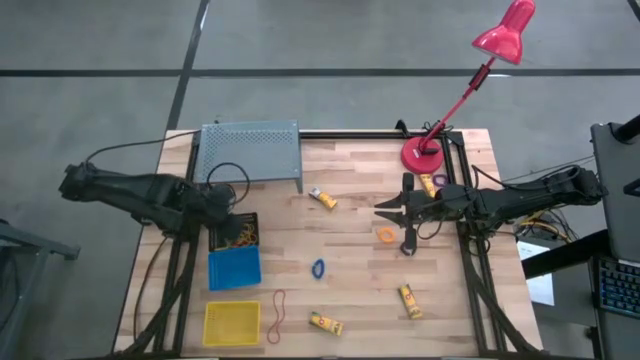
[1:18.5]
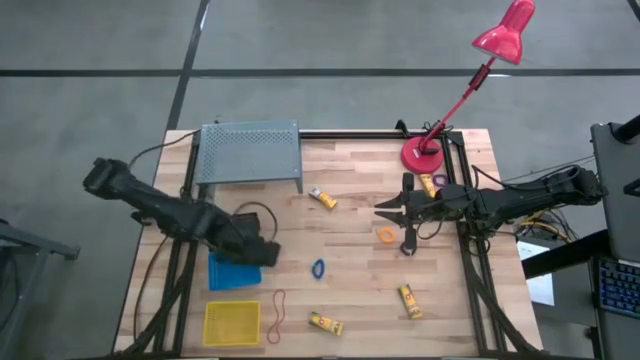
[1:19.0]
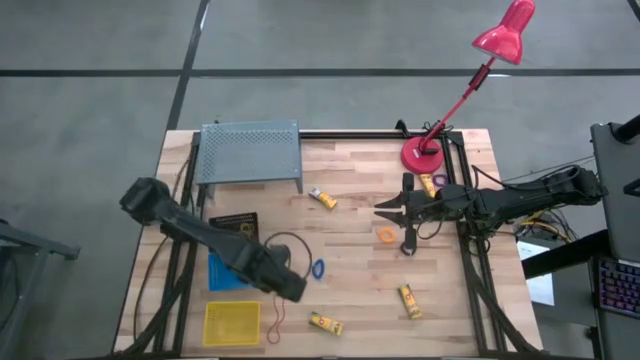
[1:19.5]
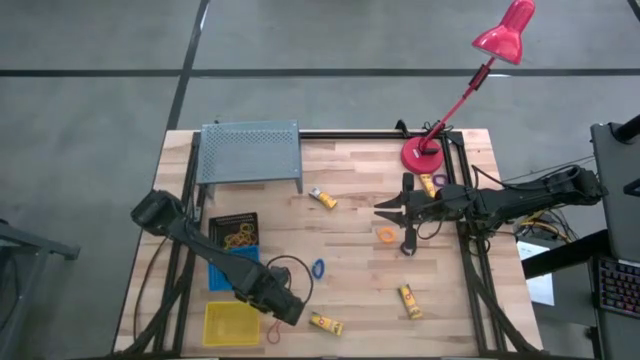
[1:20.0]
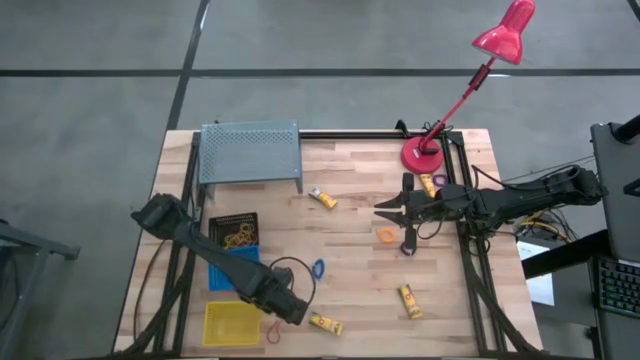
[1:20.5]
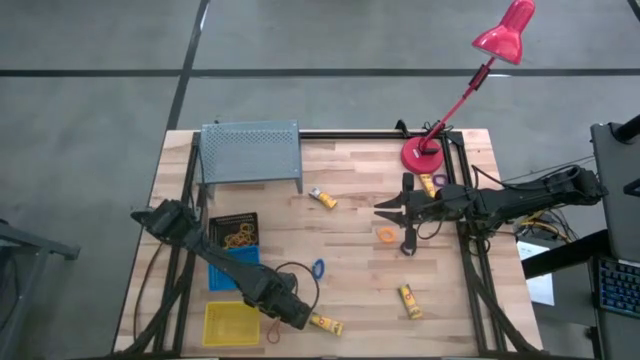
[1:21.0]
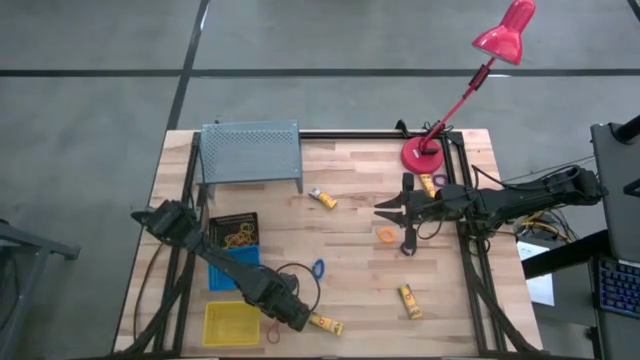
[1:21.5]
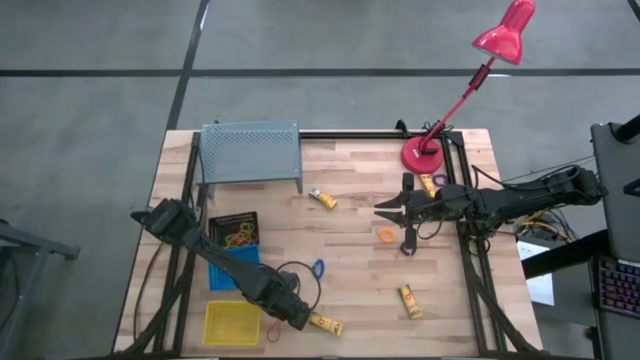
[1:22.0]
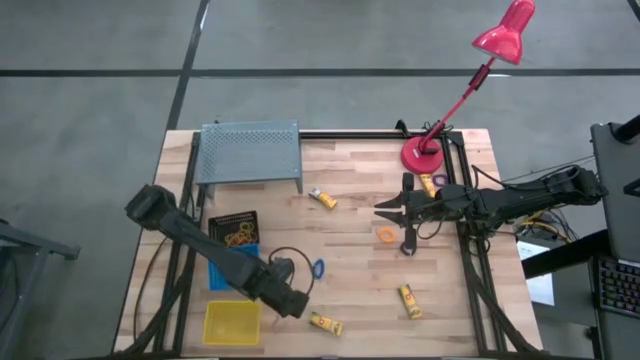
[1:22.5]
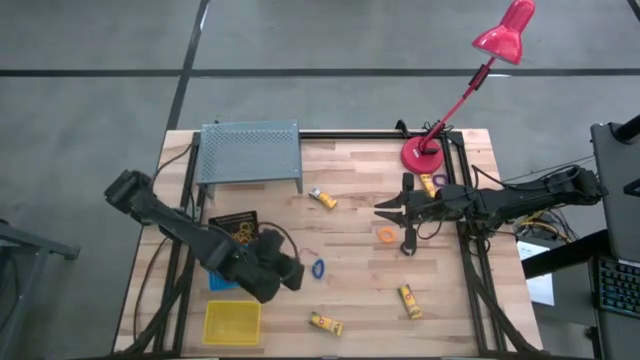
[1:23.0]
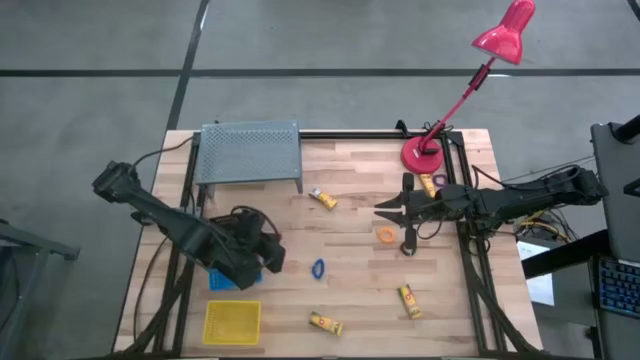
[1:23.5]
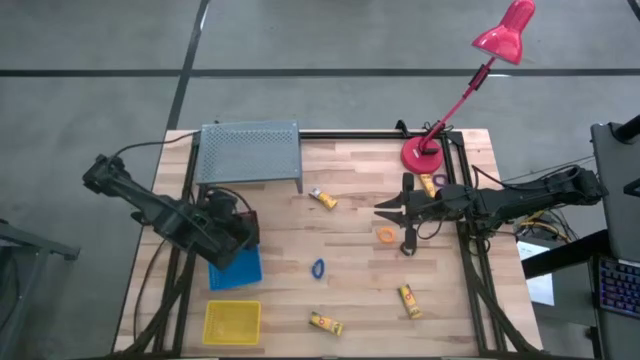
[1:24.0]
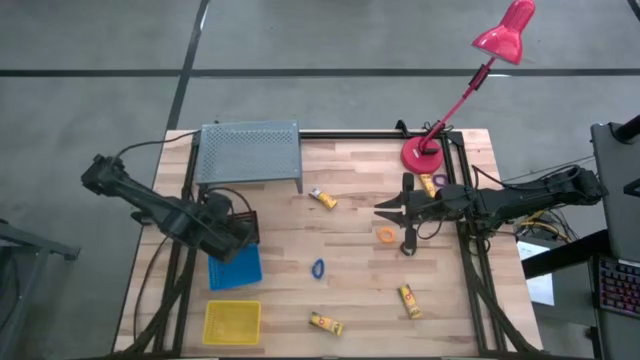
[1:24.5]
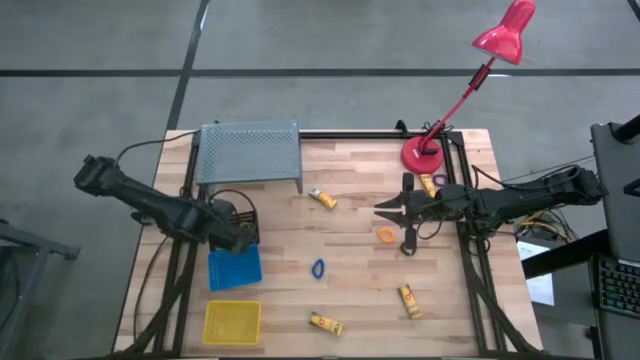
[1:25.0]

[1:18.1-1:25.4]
Task: Pick & Place Office Desk Supplies
Put the red rubber band in the black bin

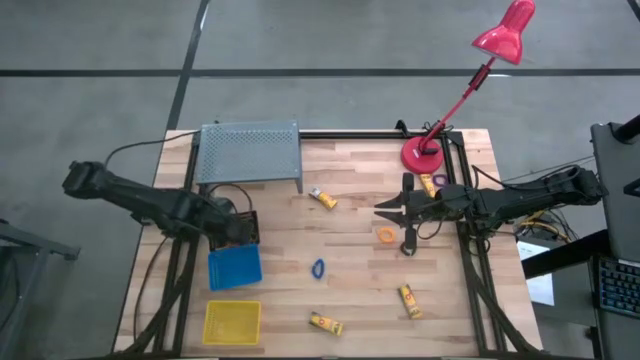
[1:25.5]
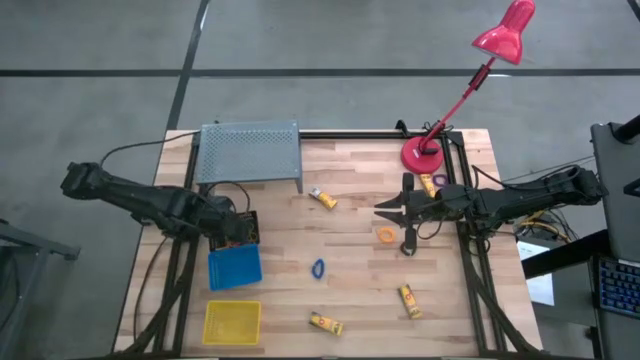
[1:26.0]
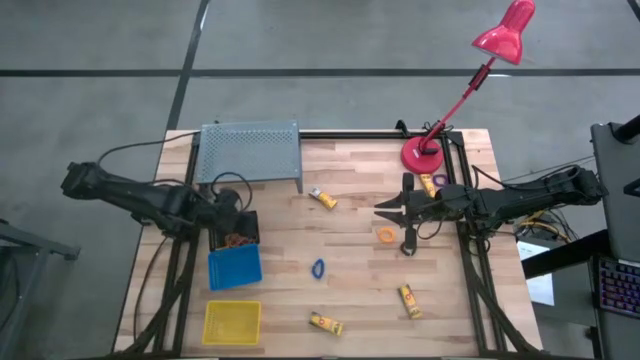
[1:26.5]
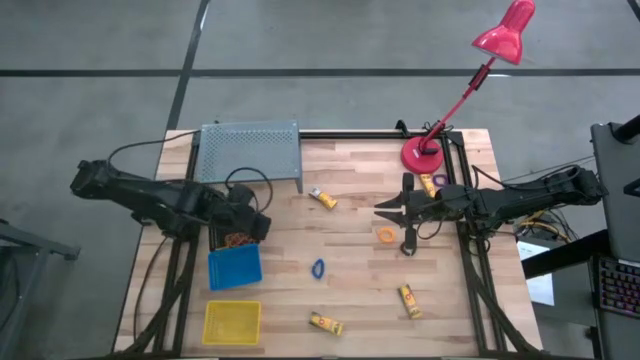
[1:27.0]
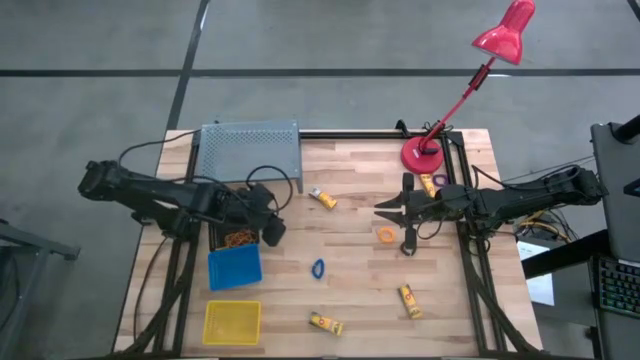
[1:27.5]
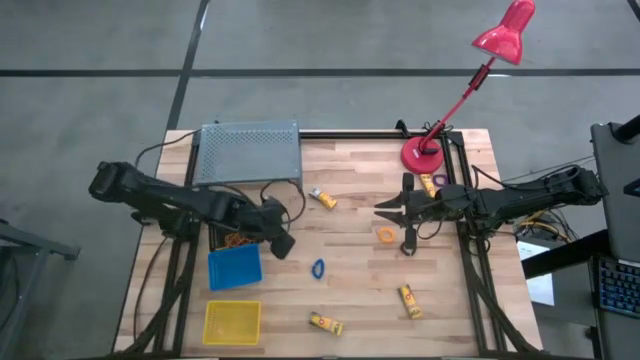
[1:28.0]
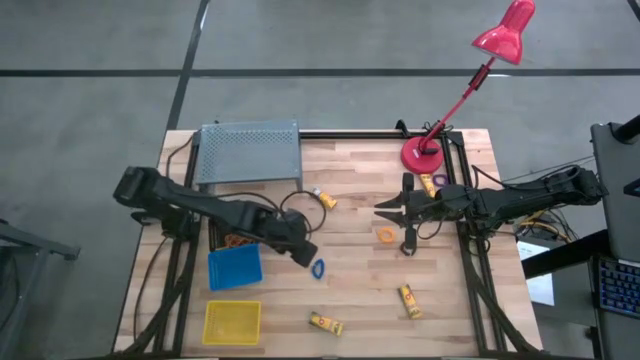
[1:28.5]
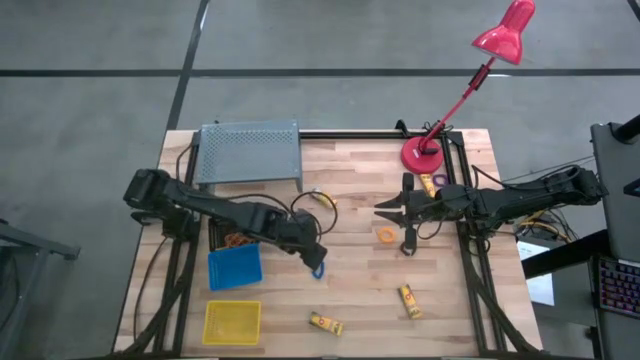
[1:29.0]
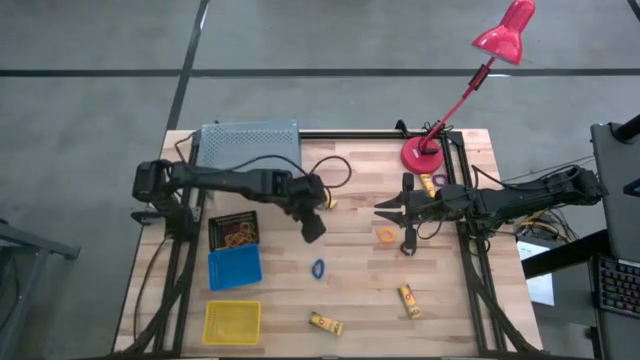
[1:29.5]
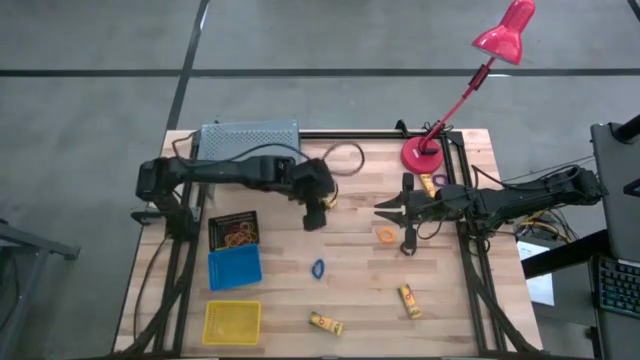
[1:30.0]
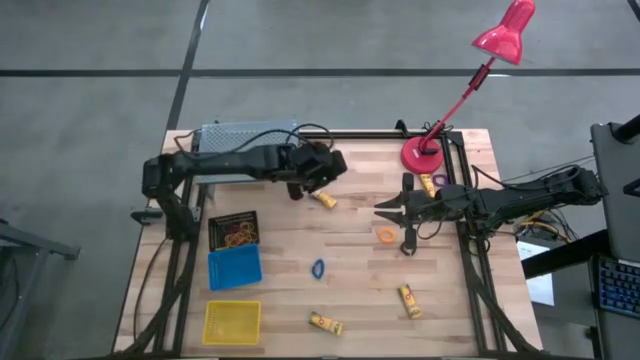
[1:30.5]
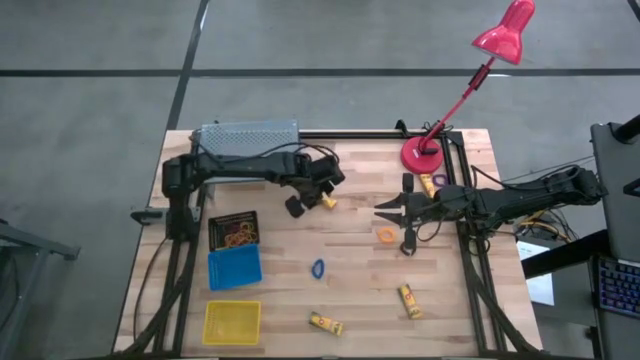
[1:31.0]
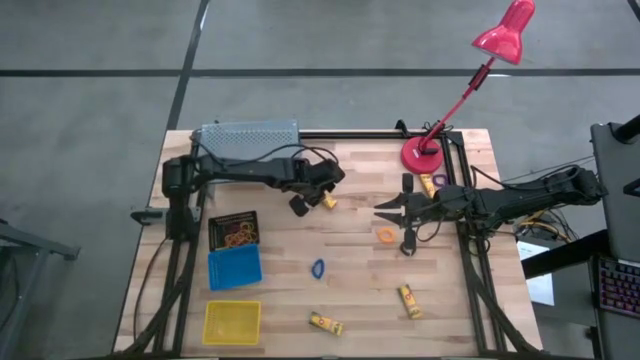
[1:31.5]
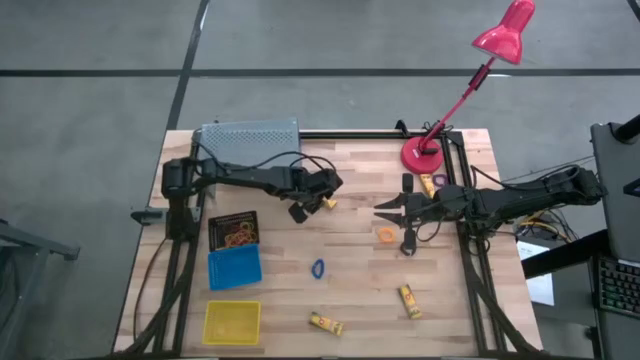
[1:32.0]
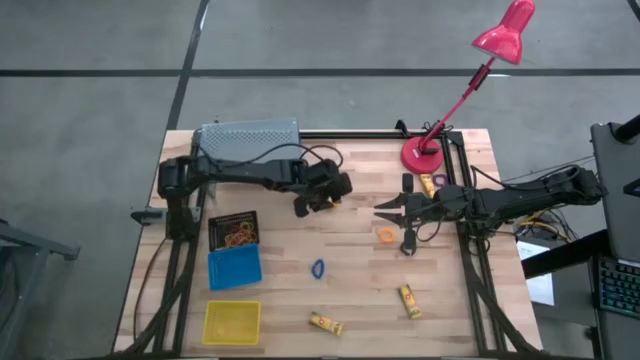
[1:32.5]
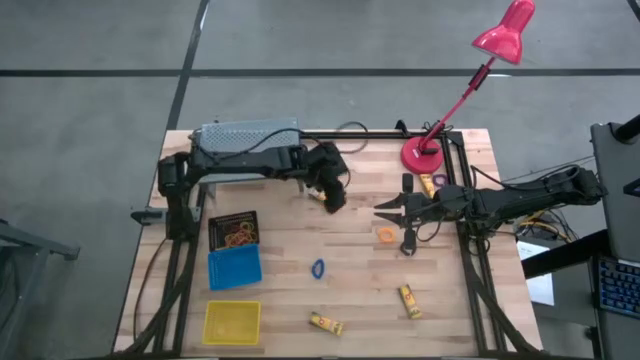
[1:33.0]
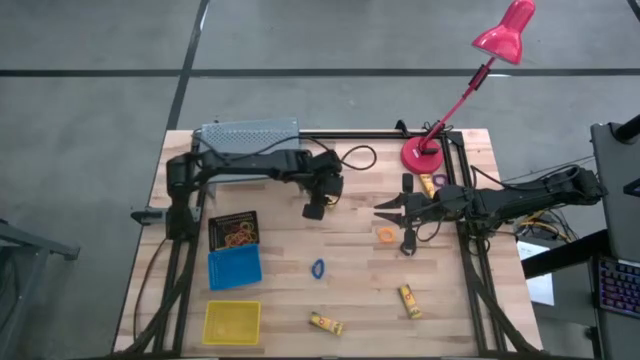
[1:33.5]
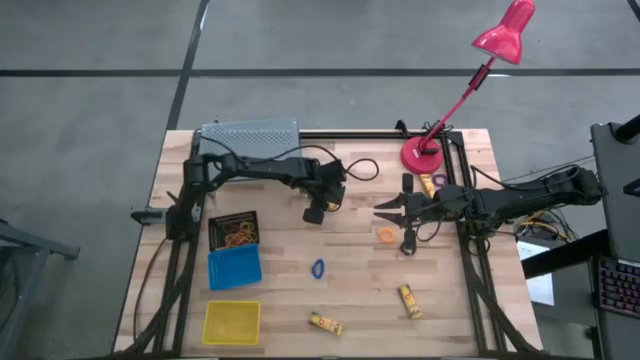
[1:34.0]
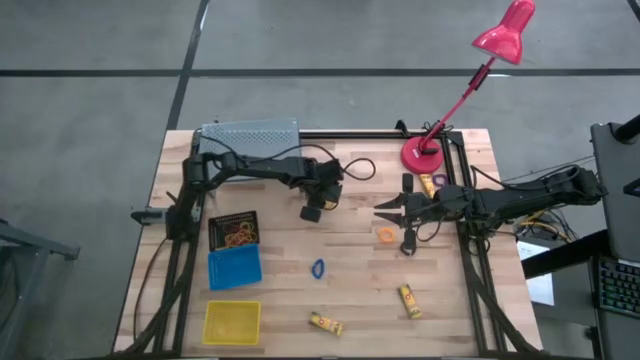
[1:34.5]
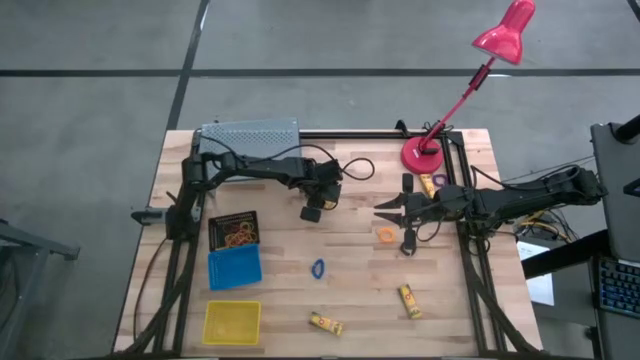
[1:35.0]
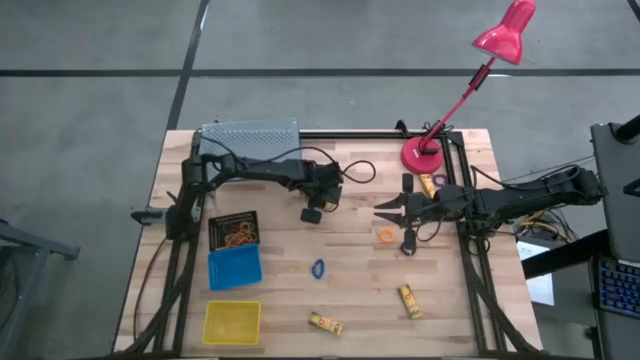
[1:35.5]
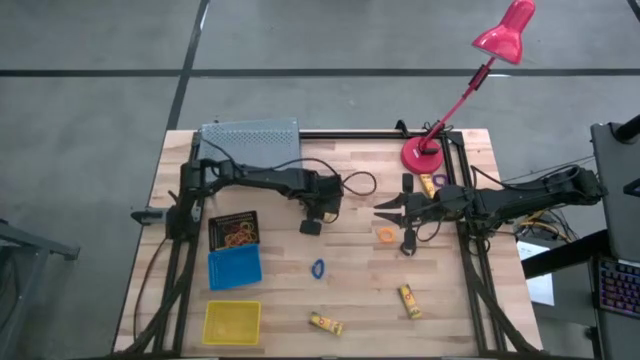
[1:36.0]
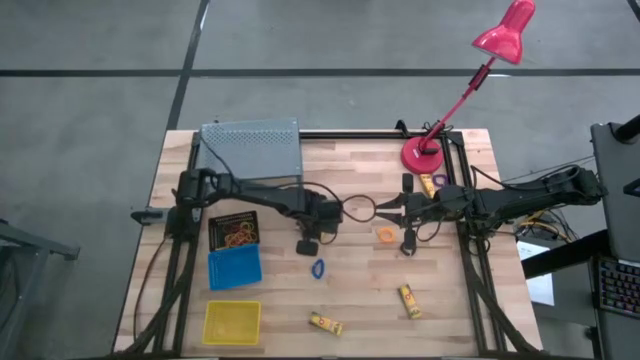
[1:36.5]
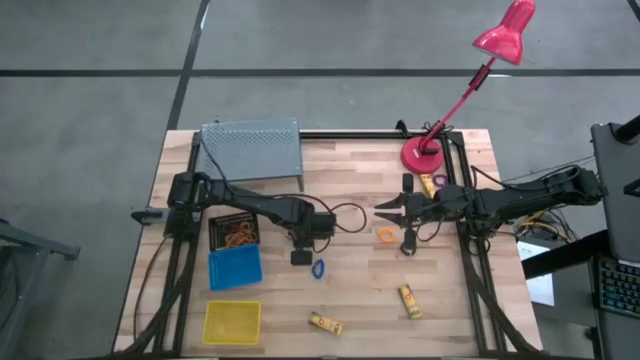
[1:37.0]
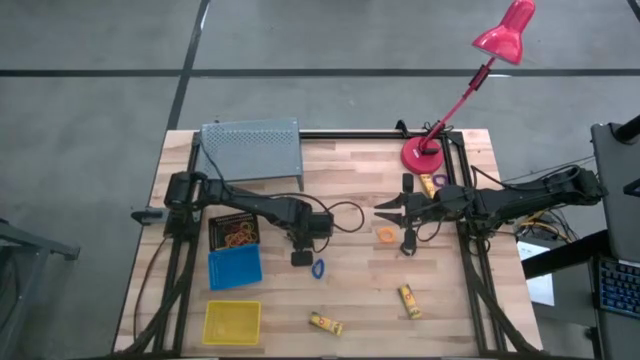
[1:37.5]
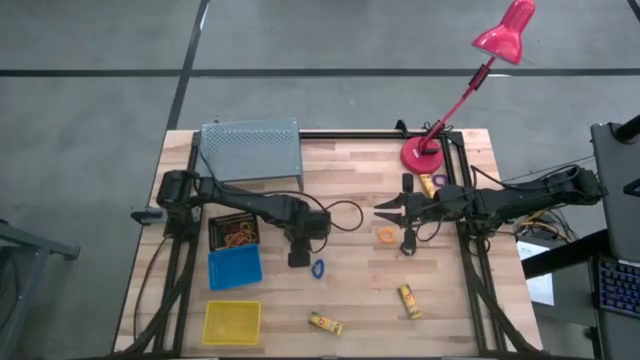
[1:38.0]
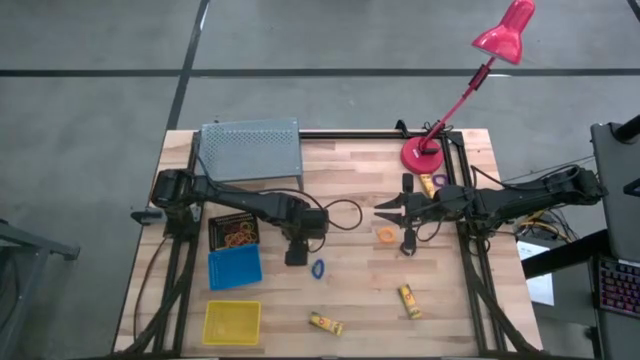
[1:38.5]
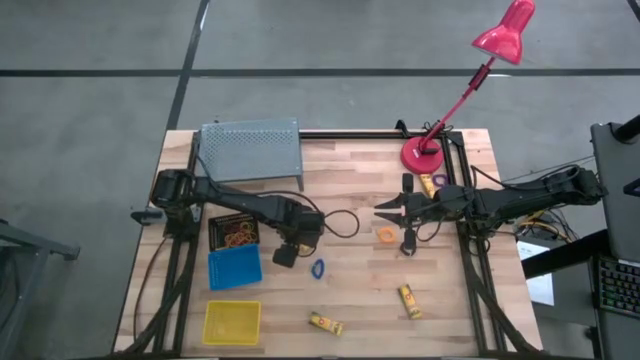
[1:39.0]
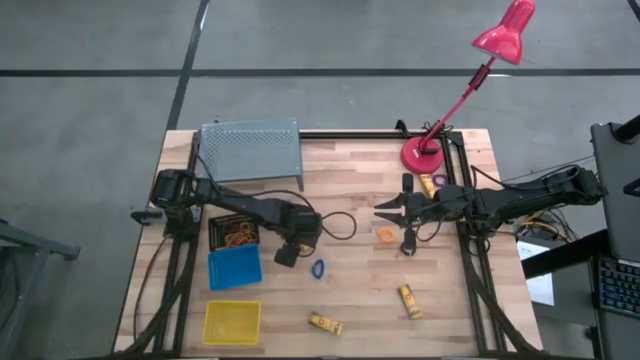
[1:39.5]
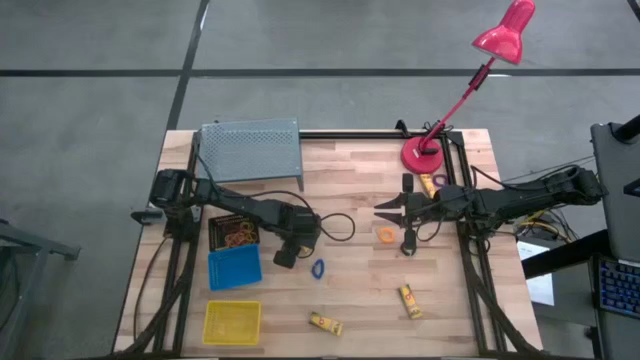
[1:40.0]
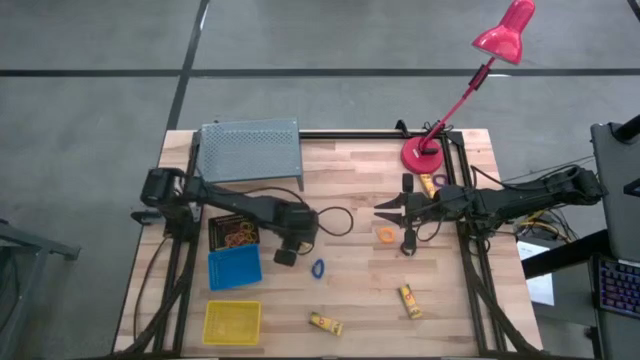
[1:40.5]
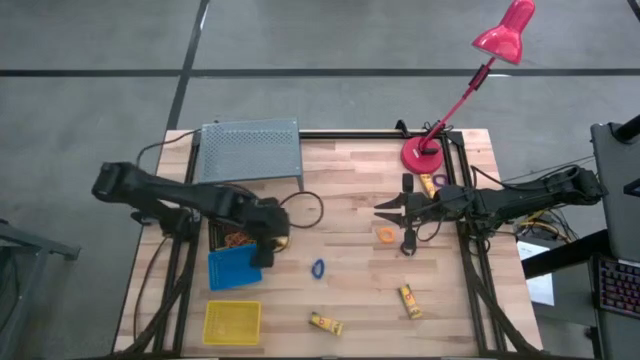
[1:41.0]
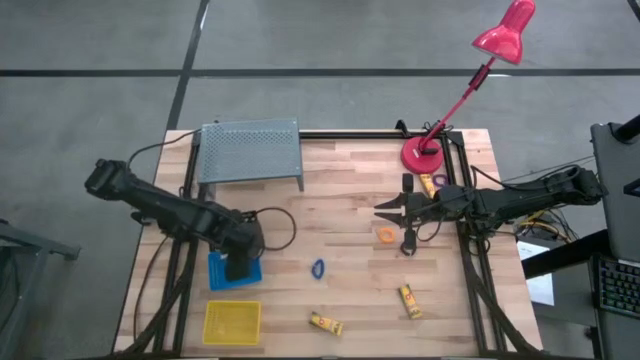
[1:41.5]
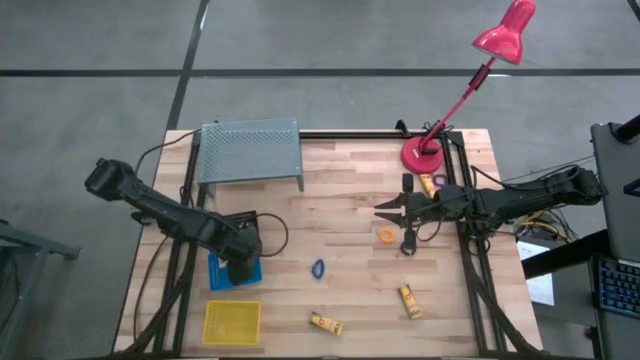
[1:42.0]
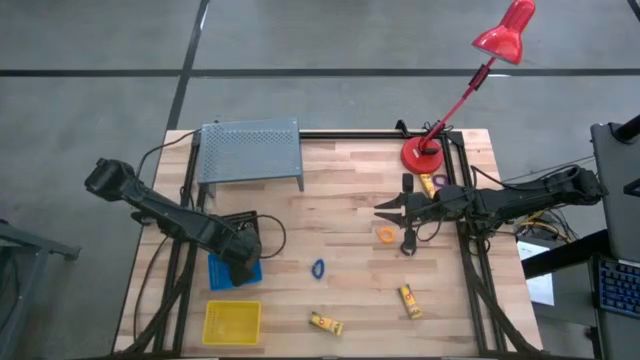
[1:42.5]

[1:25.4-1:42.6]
Put the yellow crayon box in the blue bin
